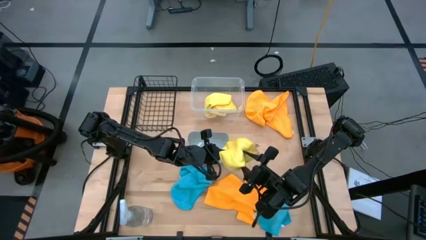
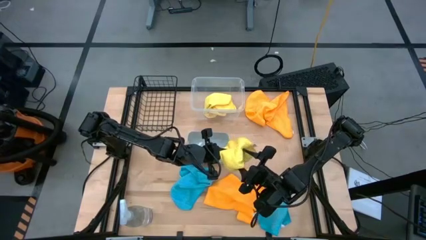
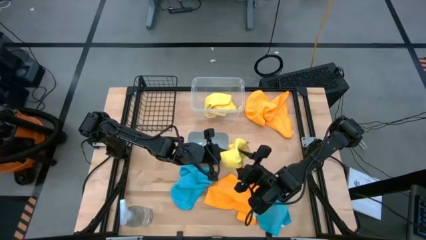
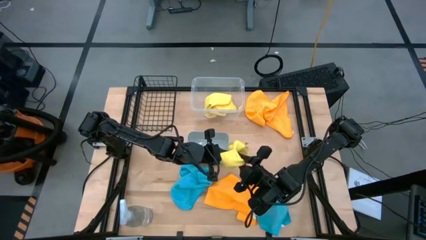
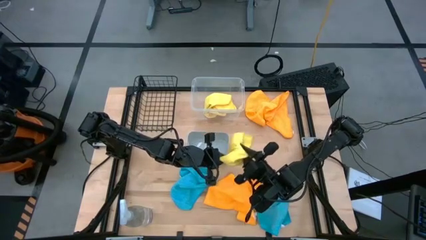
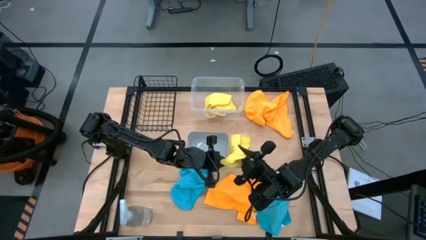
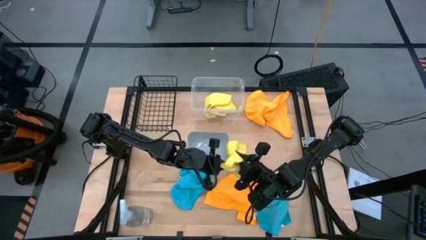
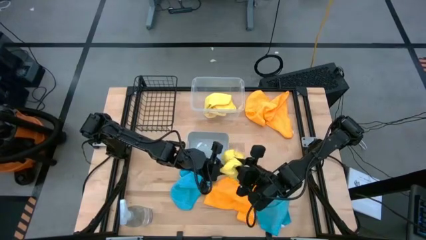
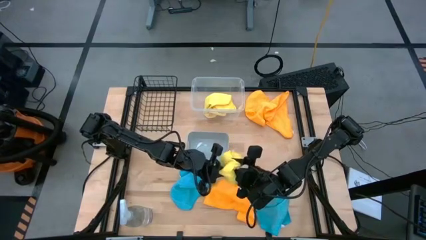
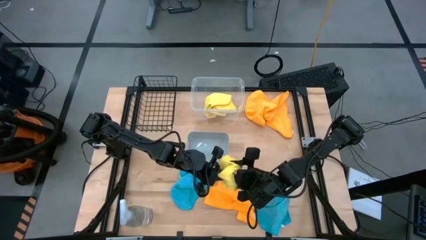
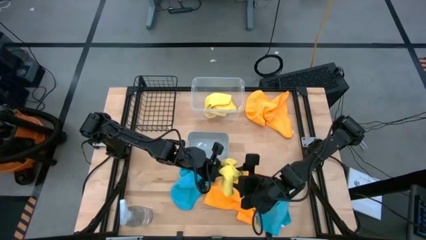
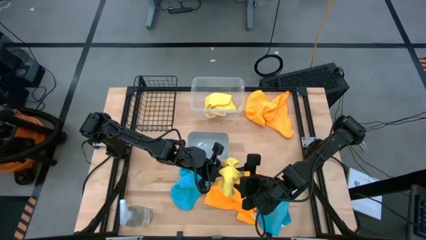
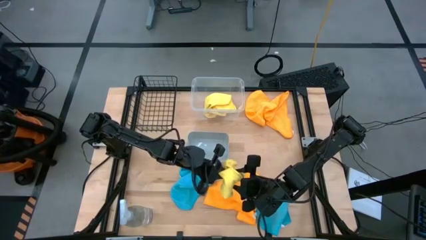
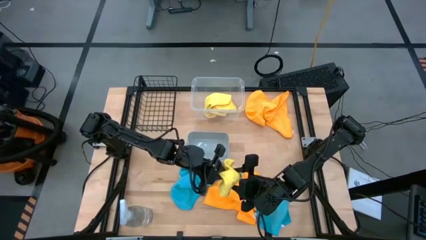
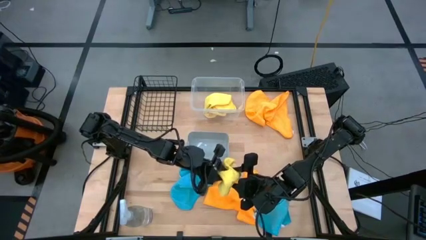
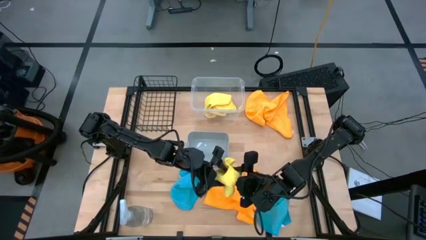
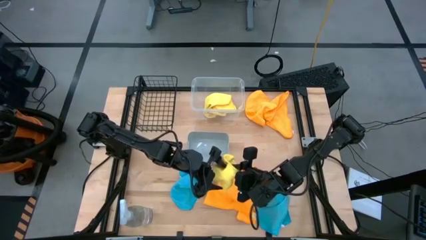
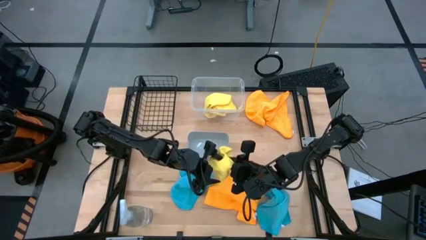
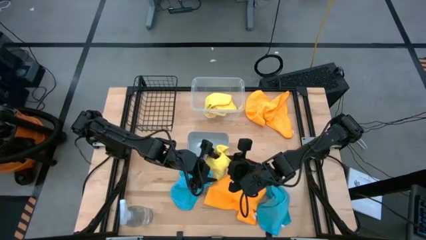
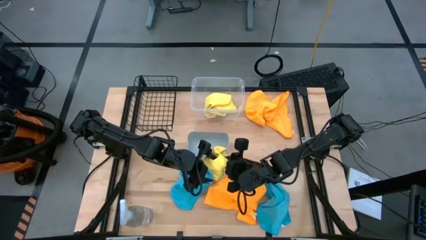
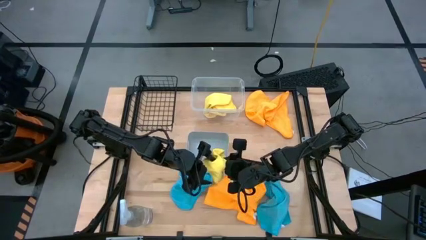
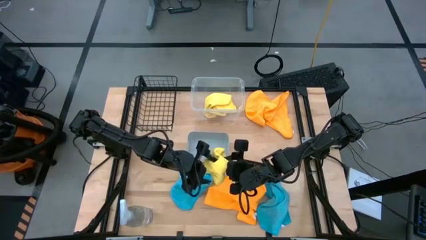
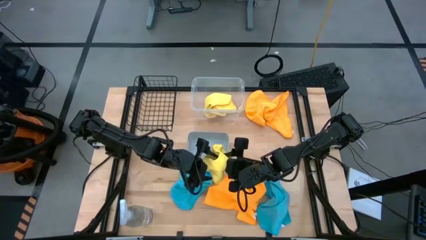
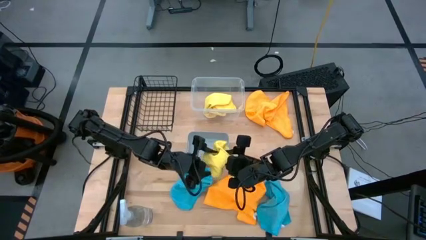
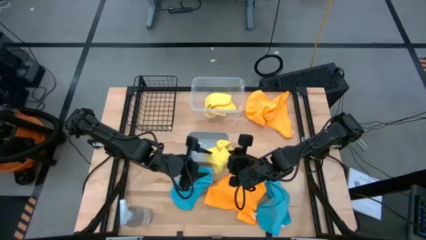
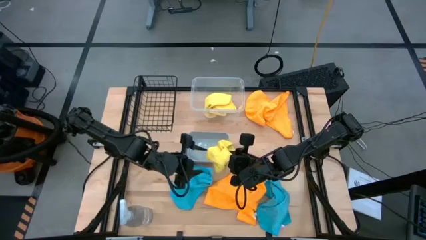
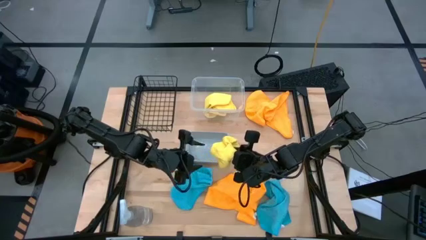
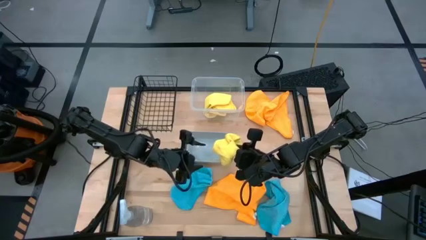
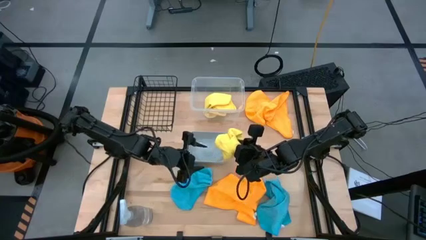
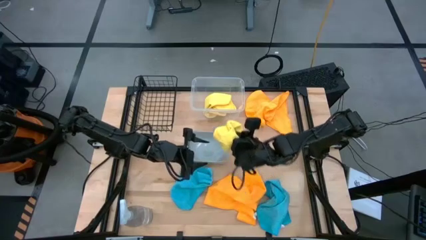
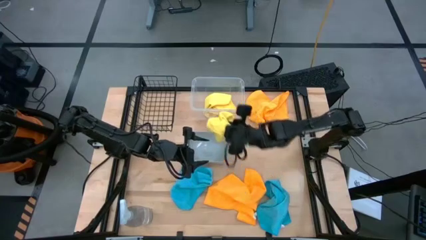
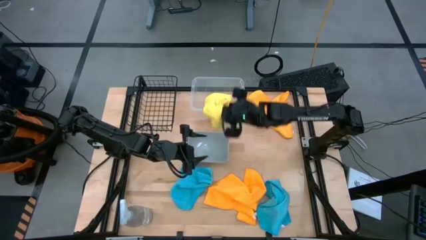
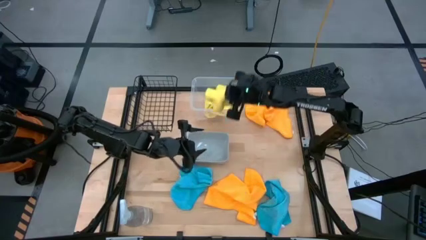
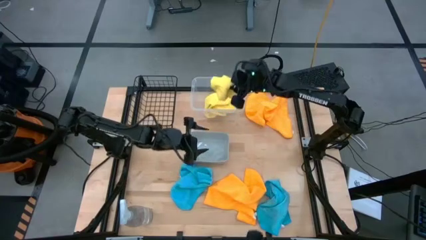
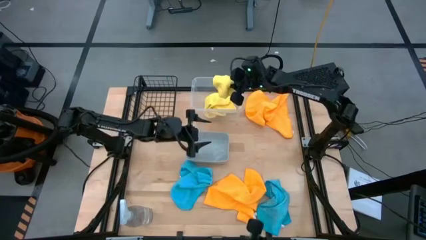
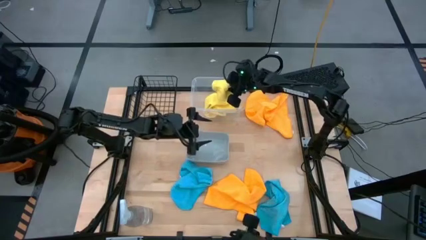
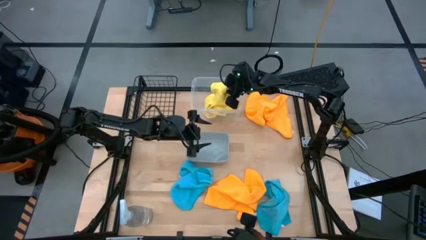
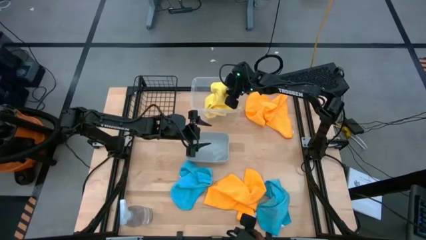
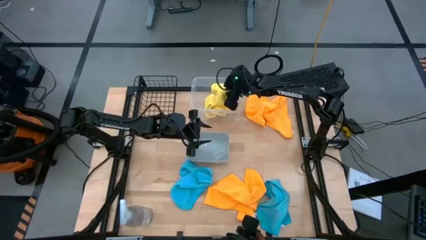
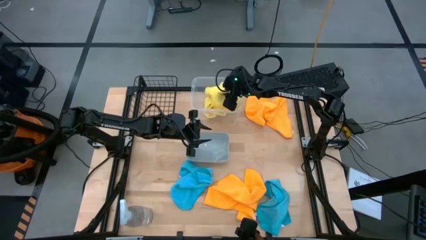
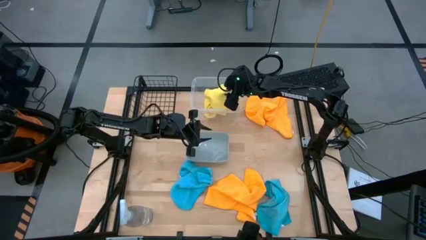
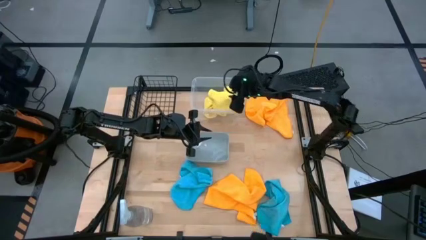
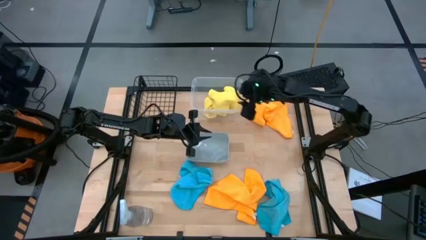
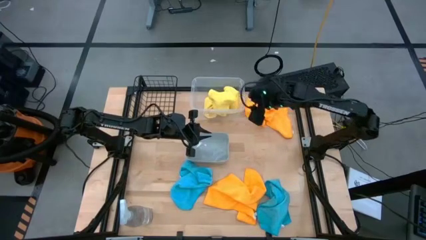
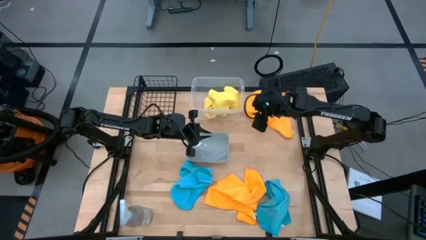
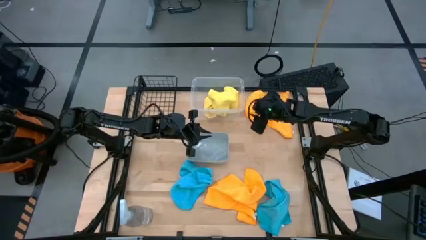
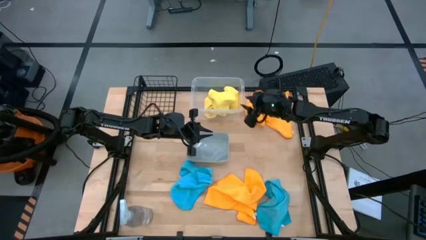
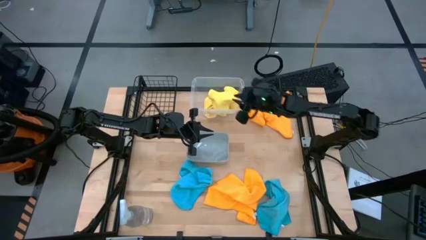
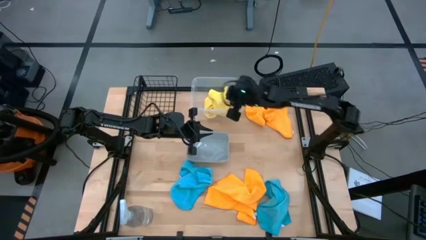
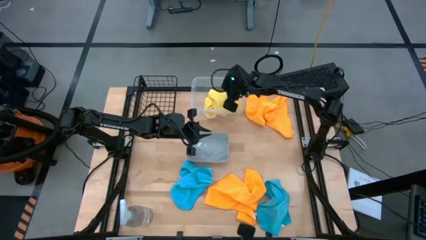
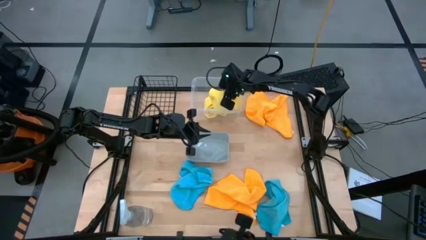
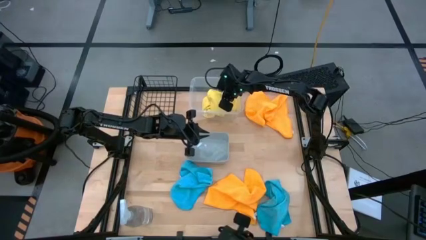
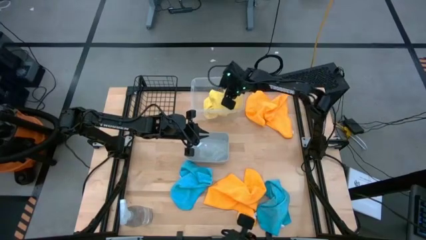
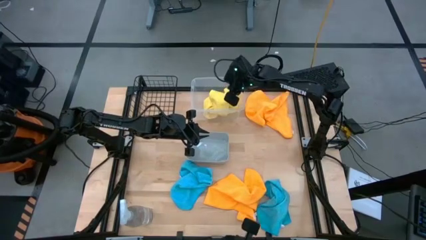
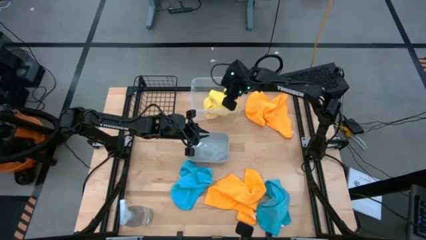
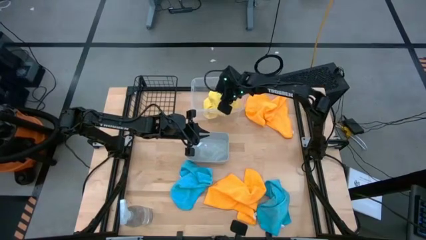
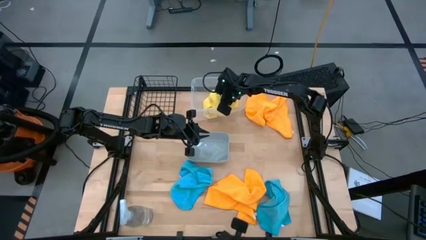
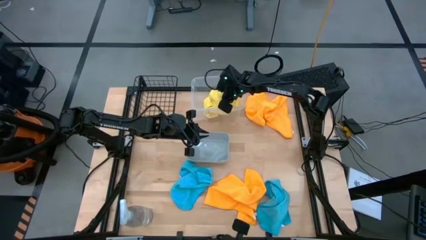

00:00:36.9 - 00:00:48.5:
Task: Sort microfiber towel by color & place in baskets
Put the yellow microfiber cloth into the transparent bin

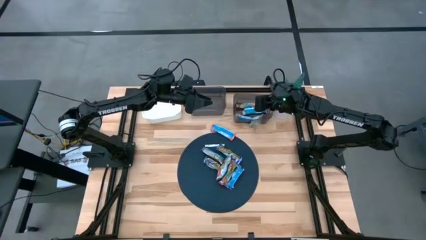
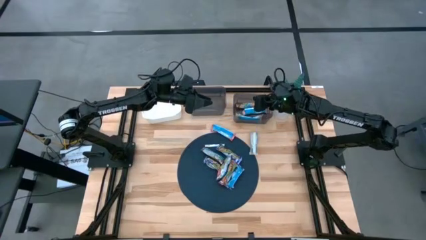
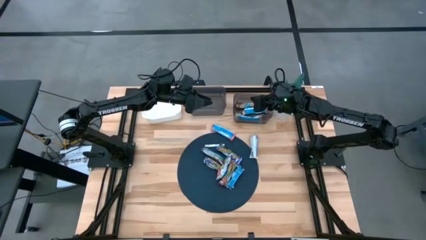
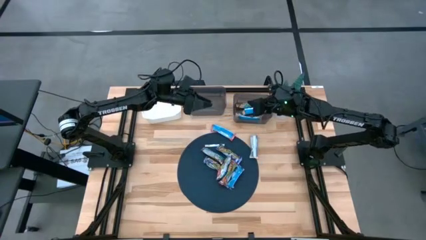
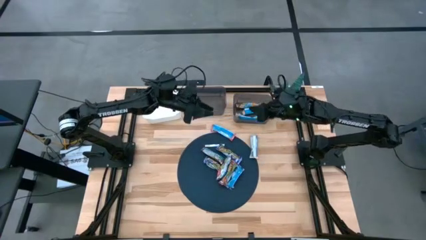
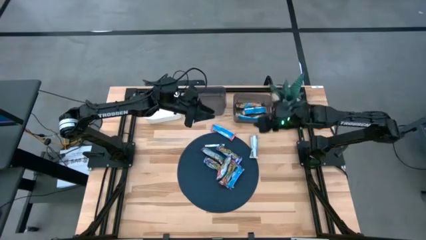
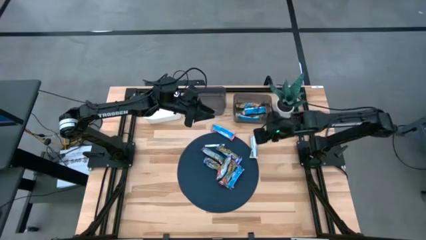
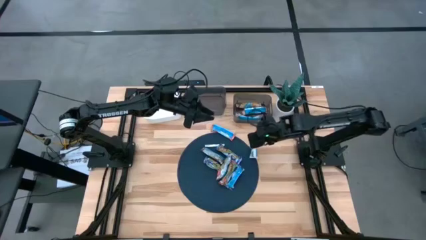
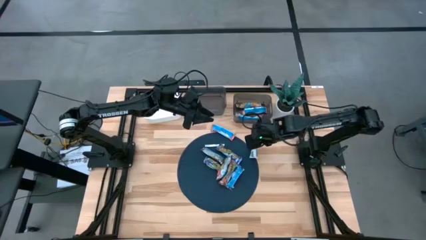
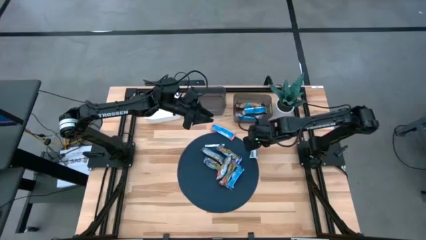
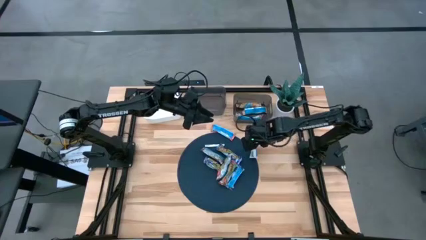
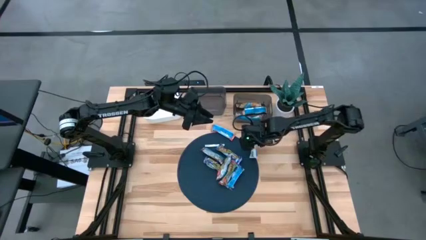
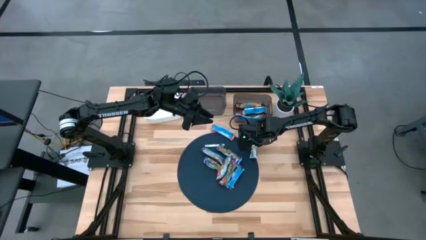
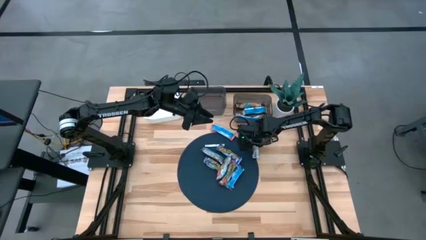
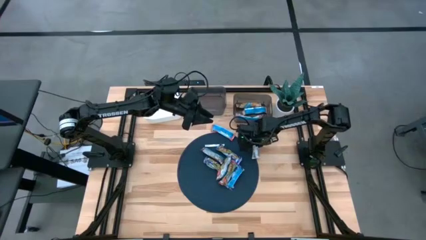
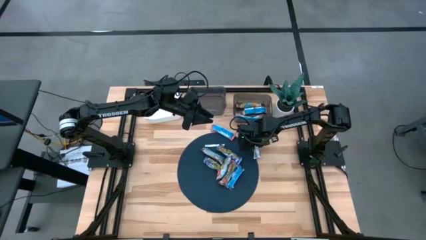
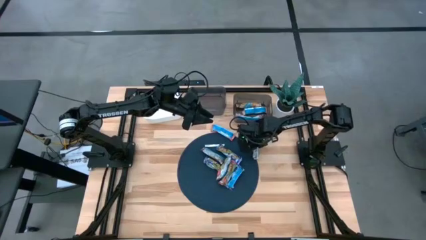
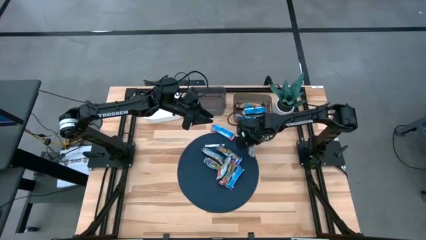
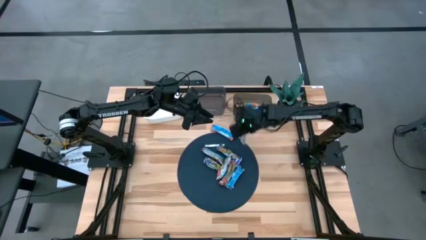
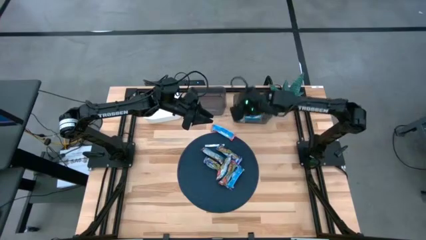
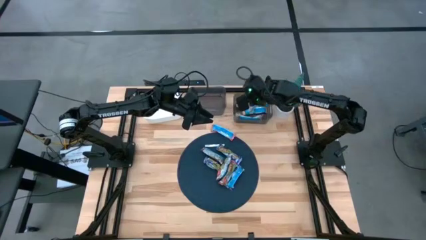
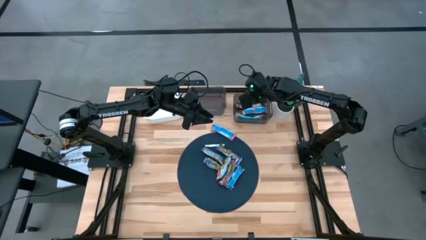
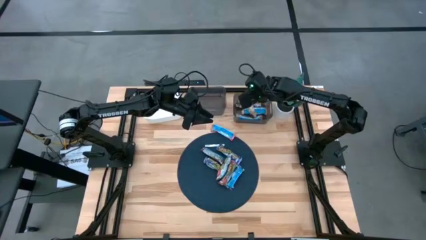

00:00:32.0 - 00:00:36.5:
Task: Pick and place Granola Bars by type
Put the yellow granola bar into the right black bin
